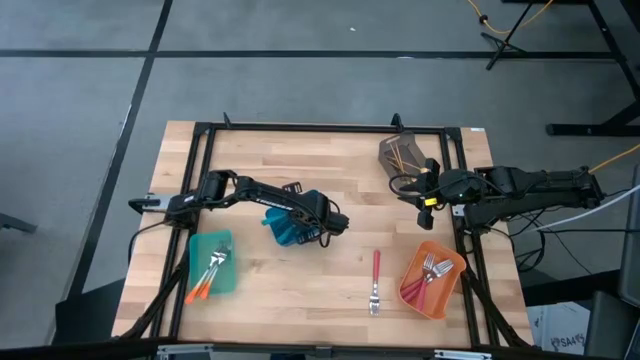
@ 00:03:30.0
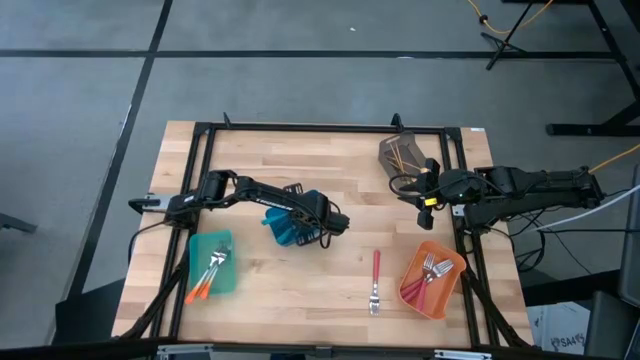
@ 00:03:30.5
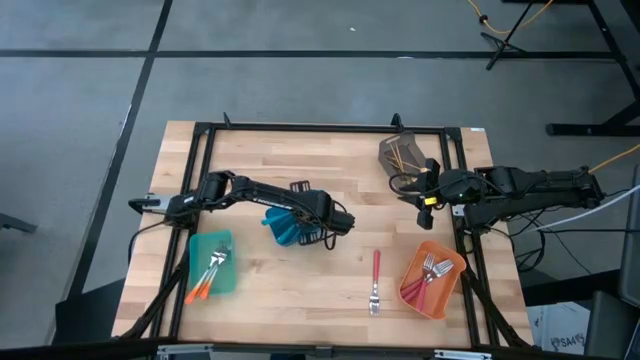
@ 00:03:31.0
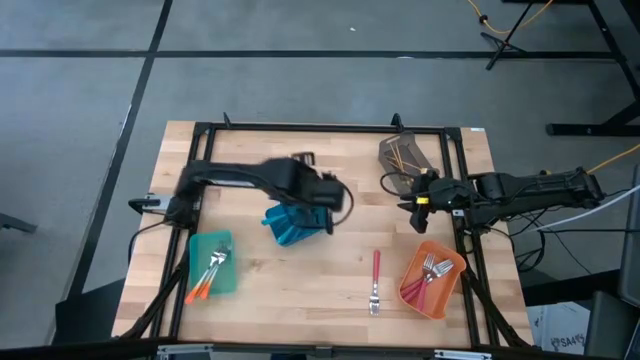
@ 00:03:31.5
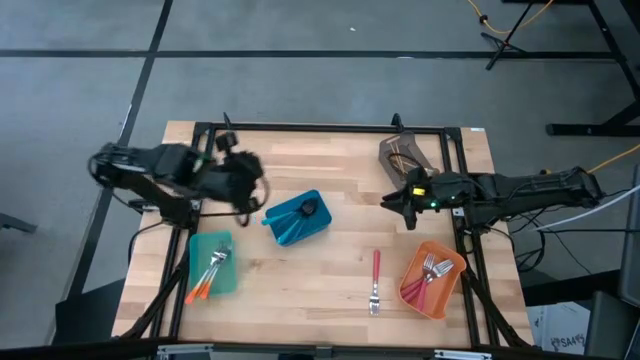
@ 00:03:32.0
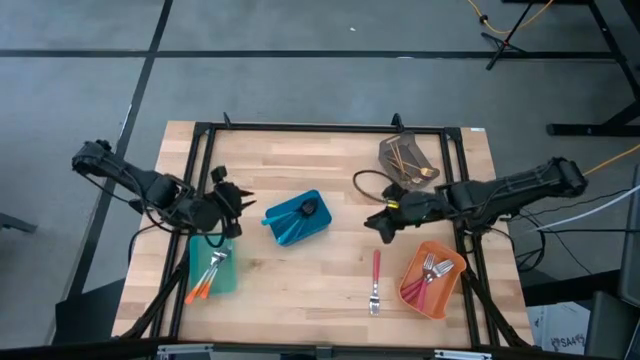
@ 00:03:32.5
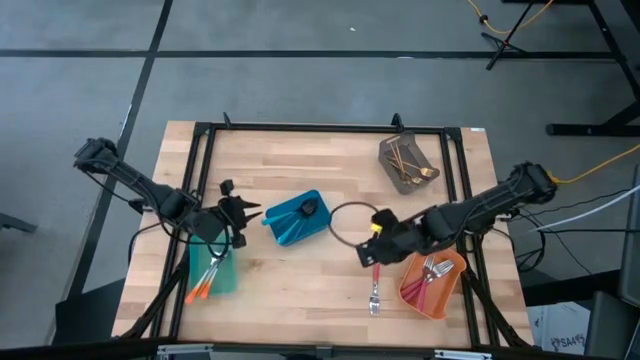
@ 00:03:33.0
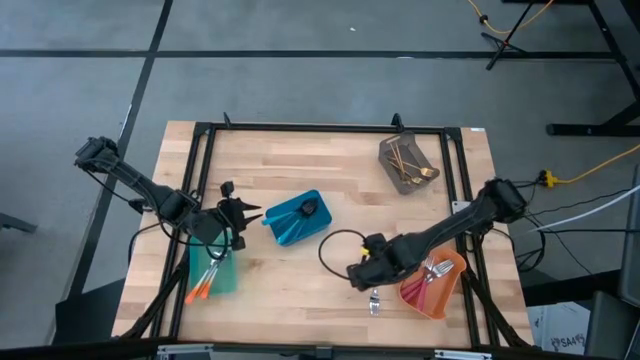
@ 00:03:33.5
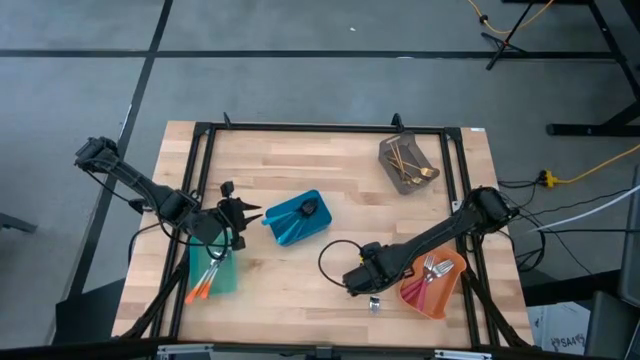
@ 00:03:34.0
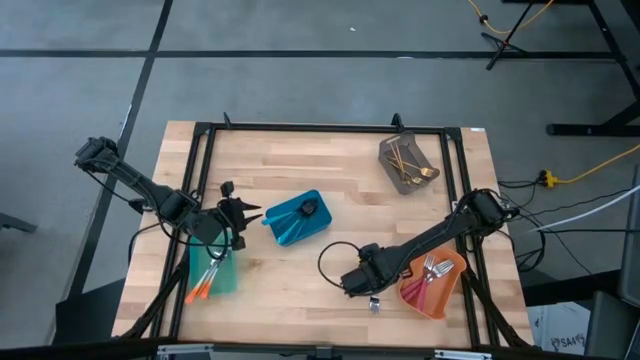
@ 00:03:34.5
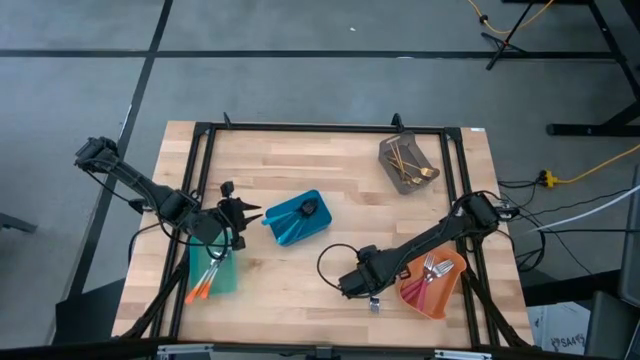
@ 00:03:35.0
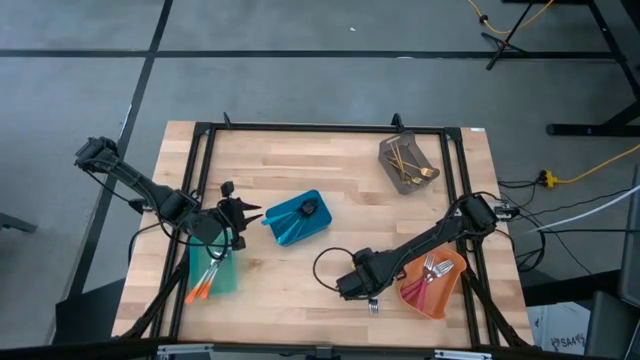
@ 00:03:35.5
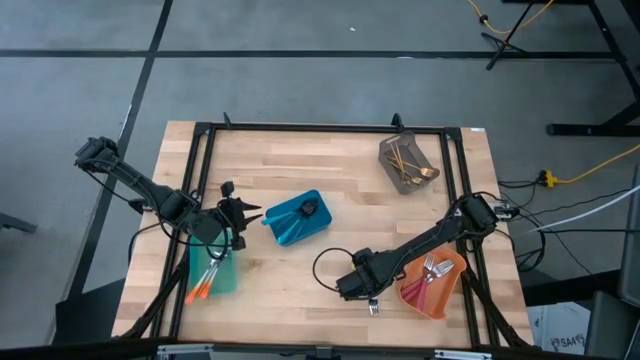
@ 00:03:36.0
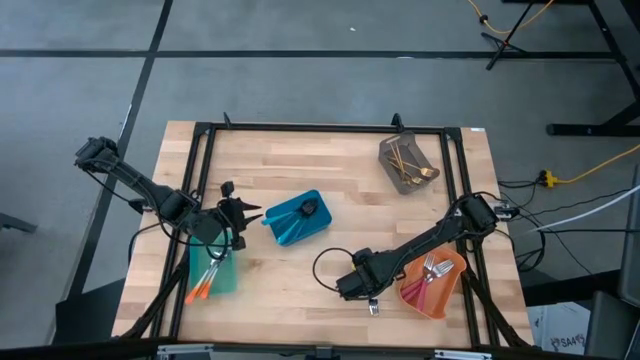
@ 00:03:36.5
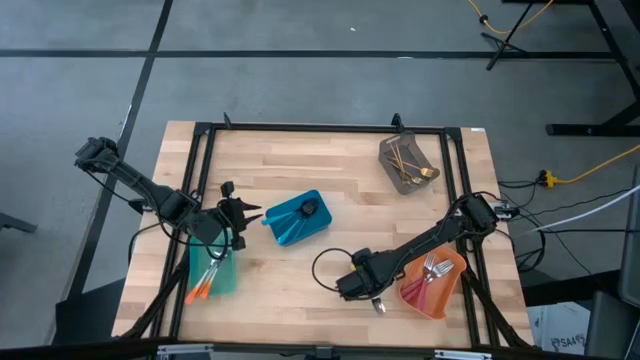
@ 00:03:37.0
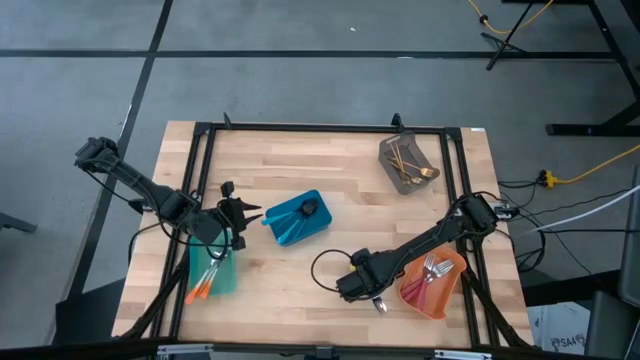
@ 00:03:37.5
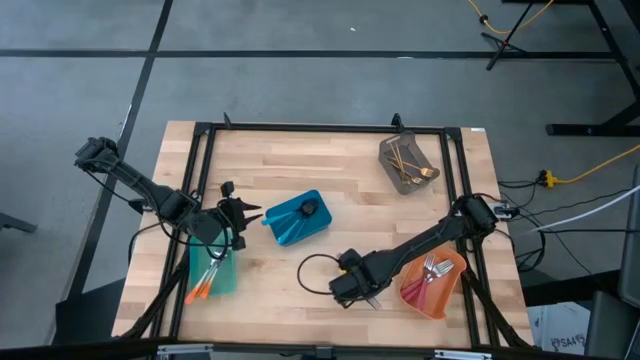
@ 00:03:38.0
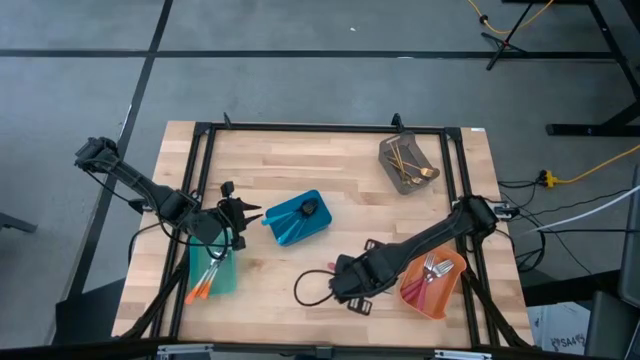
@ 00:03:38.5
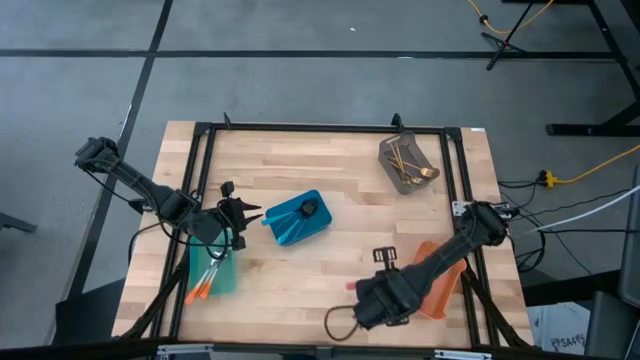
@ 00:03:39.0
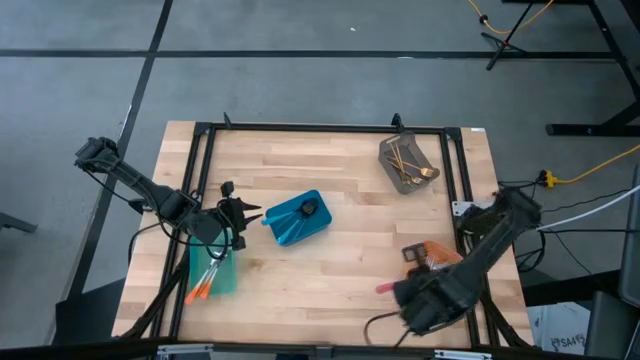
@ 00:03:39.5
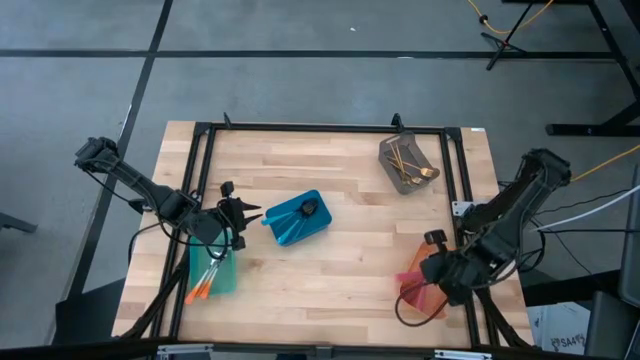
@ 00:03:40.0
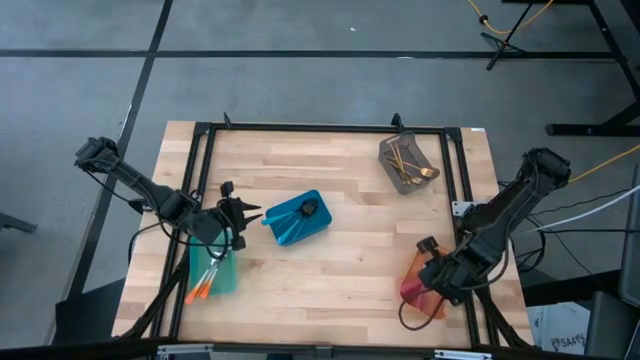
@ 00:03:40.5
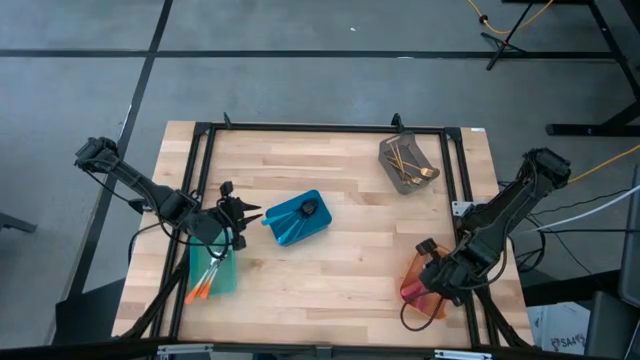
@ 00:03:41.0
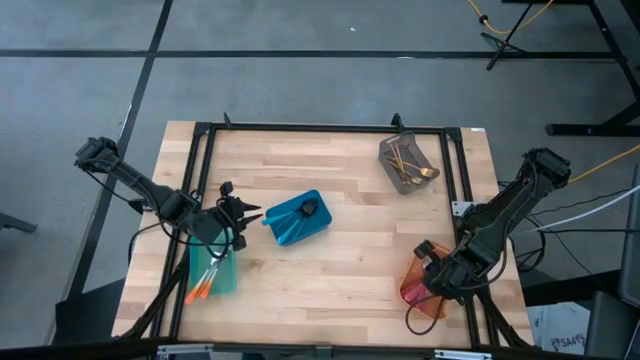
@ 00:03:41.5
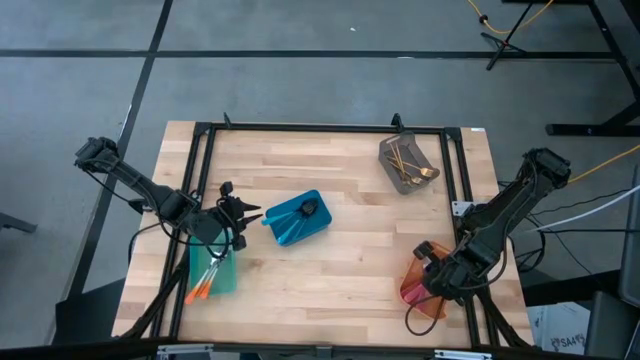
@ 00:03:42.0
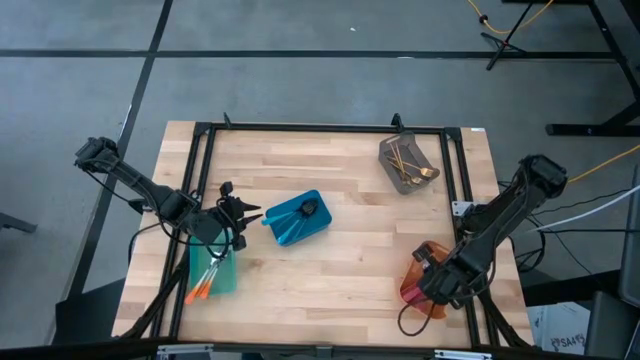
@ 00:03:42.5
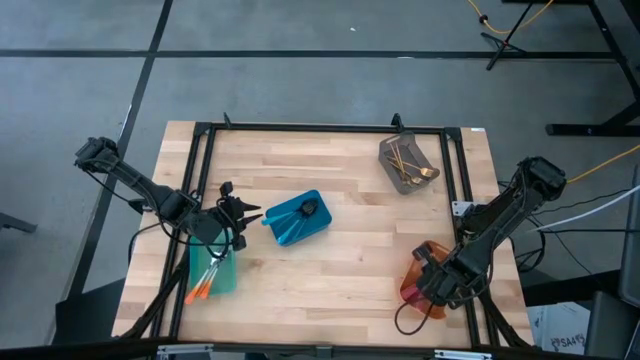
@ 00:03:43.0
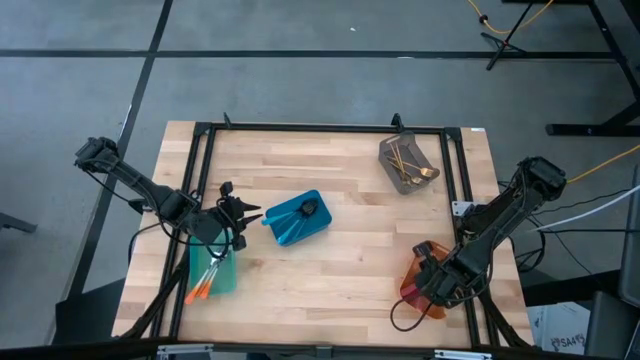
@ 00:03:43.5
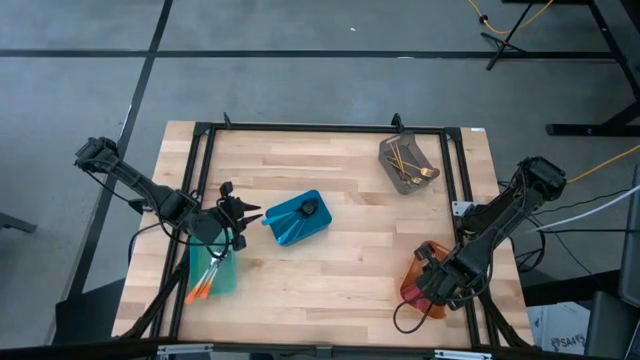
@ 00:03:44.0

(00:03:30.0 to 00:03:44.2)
Task: Sort silverware by color (type)
Put the pink fork into the orange bin

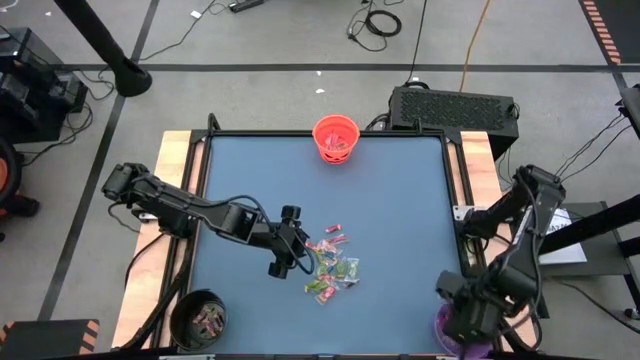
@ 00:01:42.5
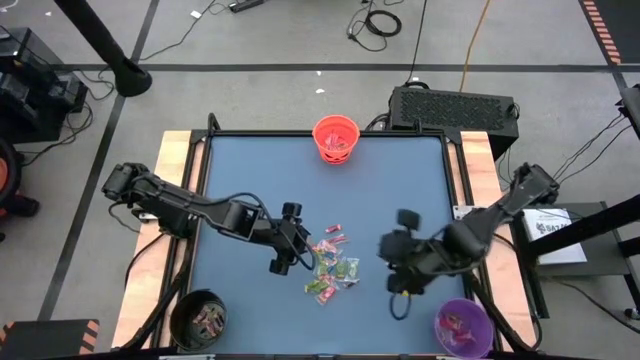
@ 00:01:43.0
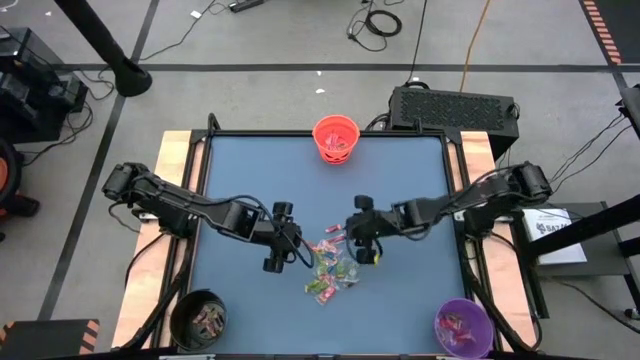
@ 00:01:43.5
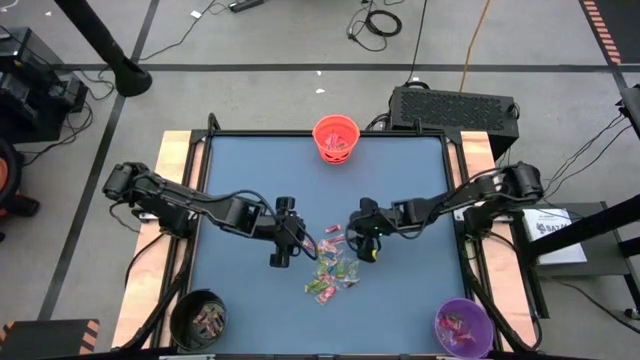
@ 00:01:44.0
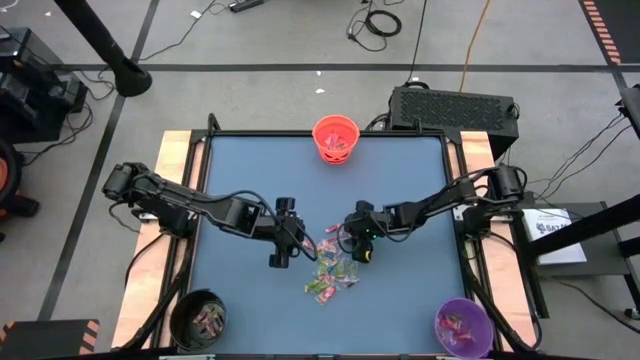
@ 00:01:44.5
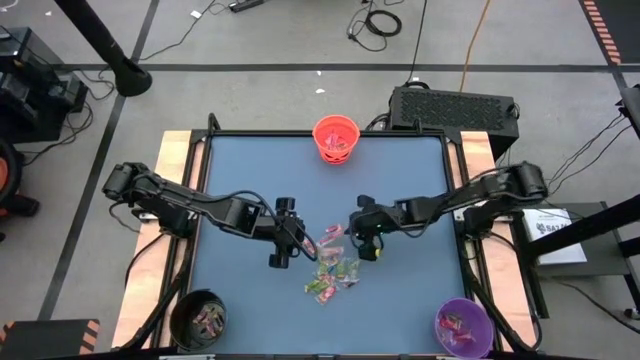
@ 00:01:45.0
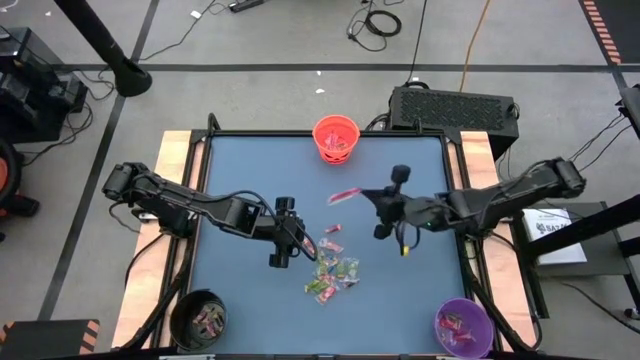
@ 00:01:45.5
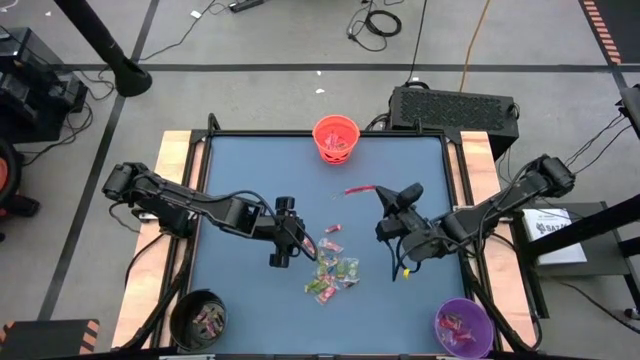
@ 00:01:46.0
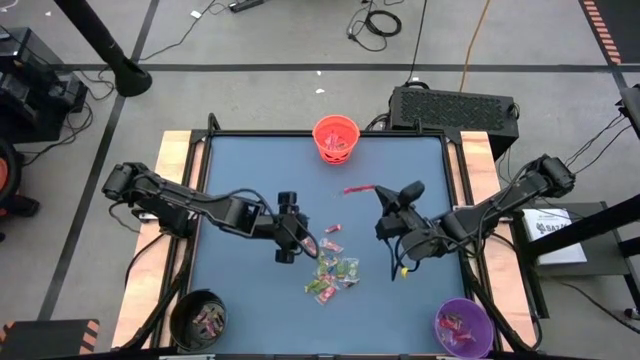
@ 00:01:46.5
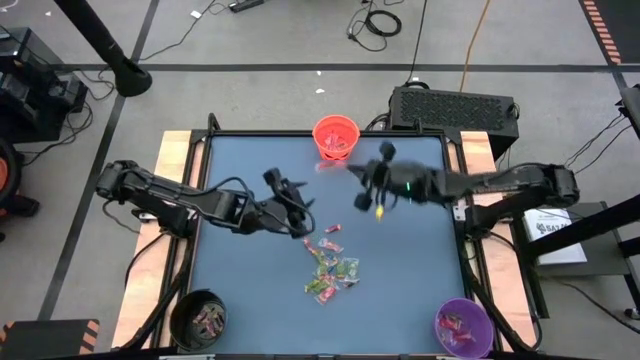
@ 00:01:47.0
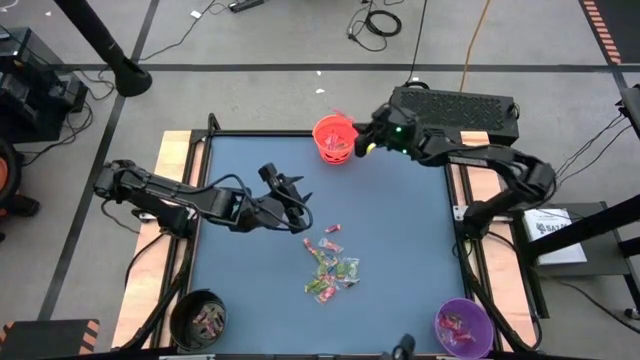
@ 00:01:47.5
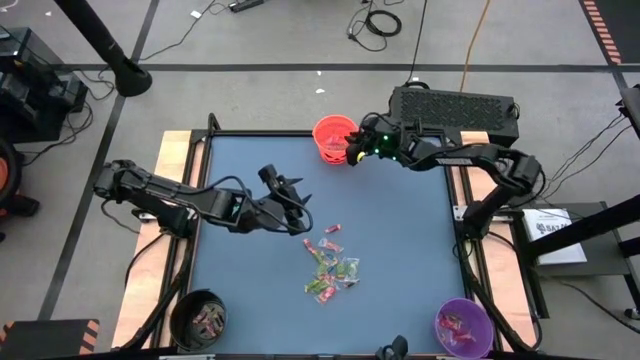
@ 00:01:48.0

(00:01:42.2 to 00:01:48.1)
Task: Sort candy by brand, put in halloween buckets
Put the long orange gummy into the orange bucket

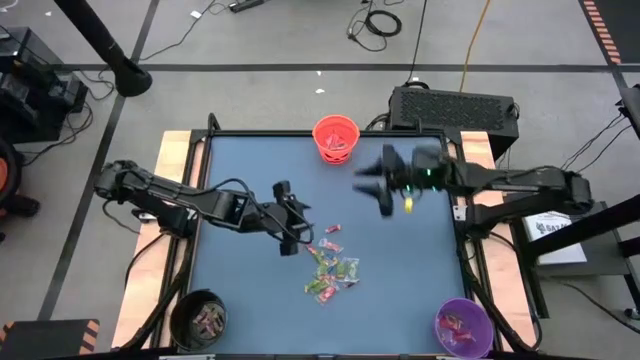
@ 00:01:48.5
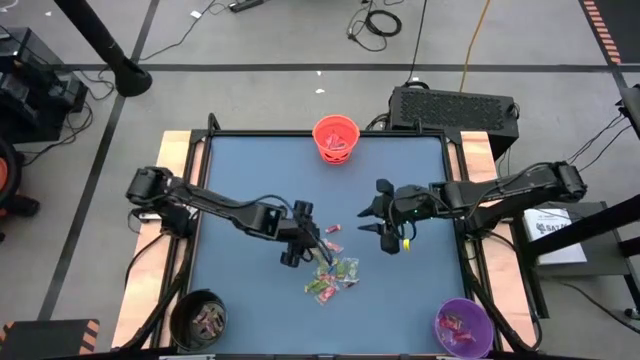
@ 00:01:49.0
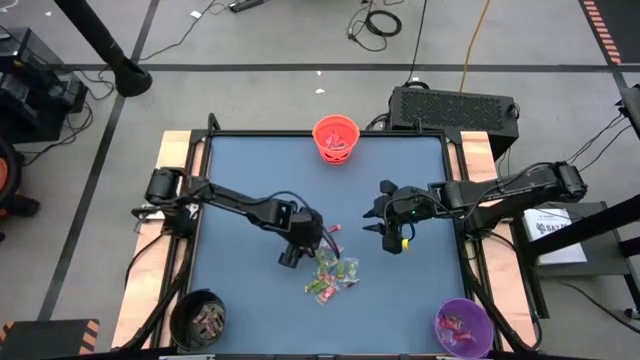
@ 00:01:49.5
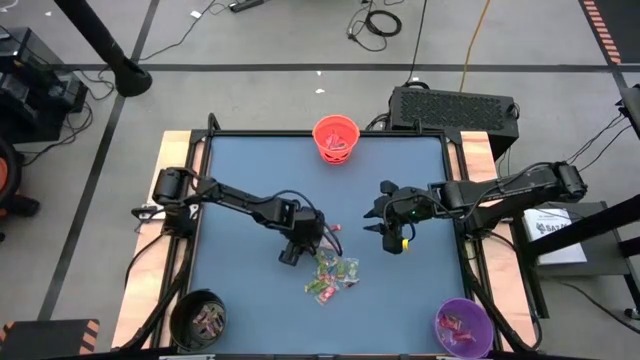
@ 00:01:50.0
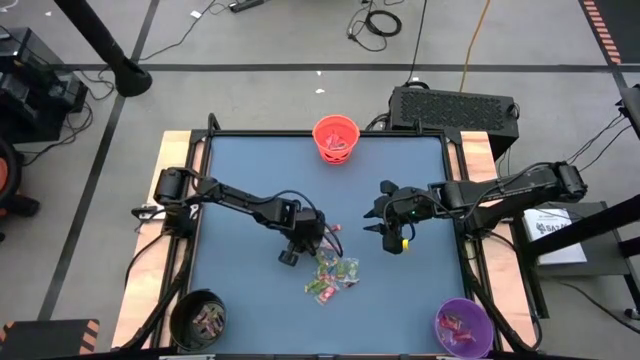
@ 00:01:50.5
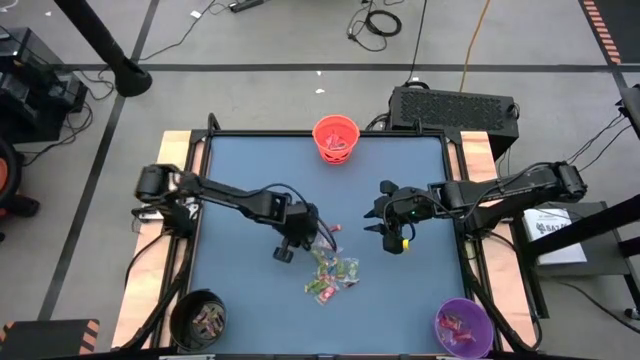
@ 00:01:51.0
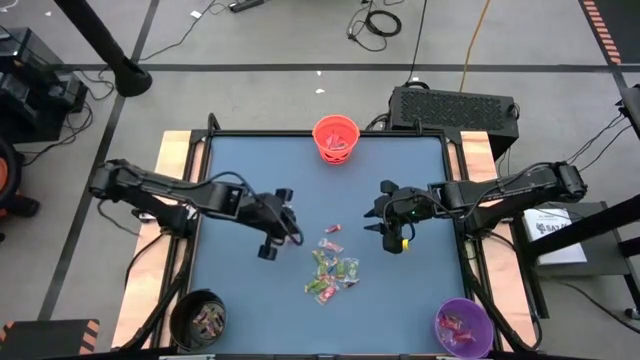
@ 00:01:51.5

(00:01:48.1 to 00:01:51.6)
Put the orange candy into the black bucket
